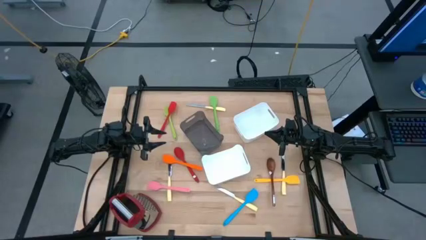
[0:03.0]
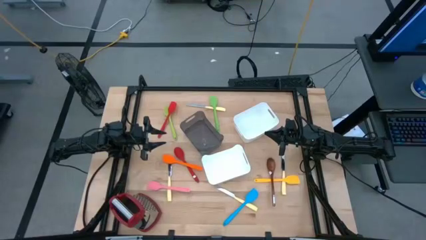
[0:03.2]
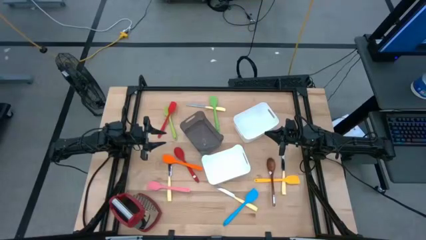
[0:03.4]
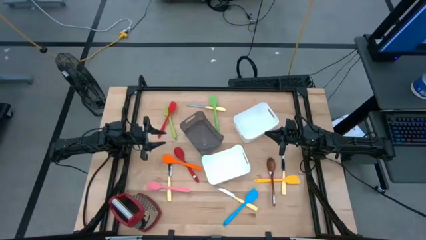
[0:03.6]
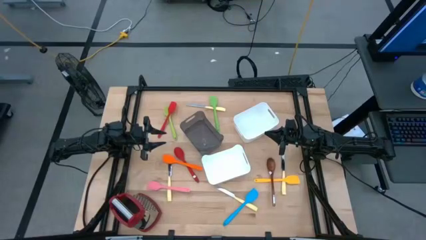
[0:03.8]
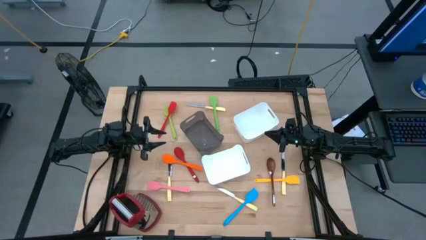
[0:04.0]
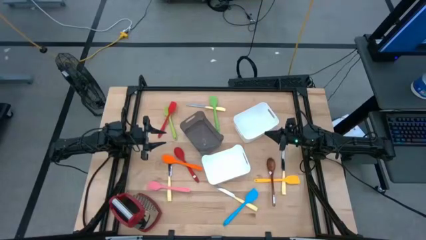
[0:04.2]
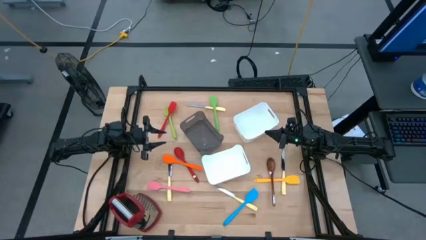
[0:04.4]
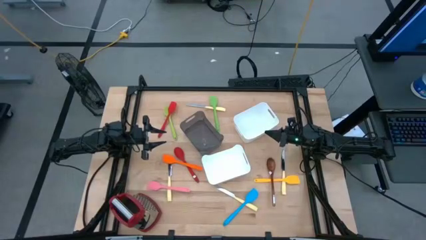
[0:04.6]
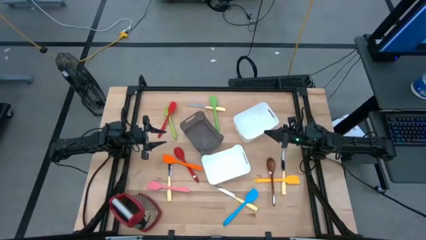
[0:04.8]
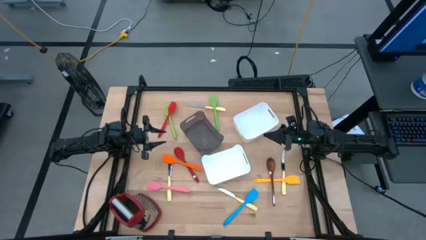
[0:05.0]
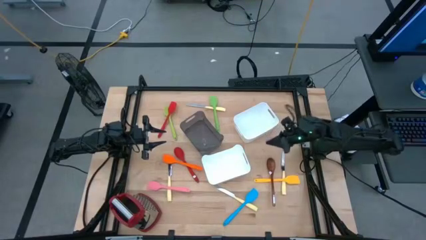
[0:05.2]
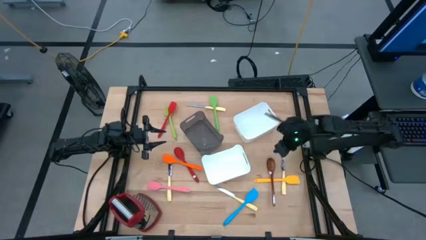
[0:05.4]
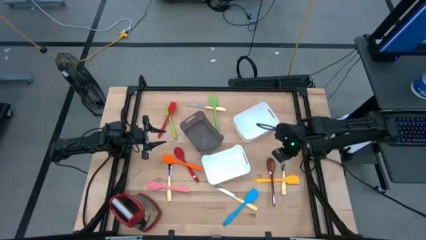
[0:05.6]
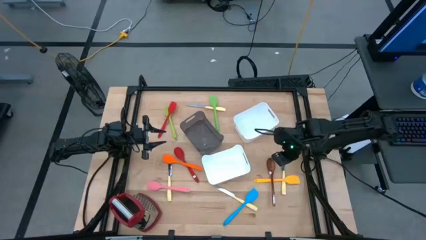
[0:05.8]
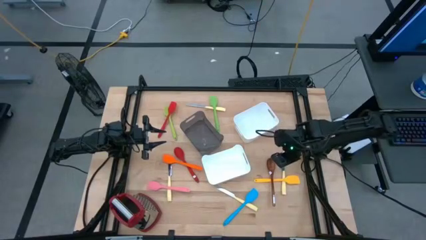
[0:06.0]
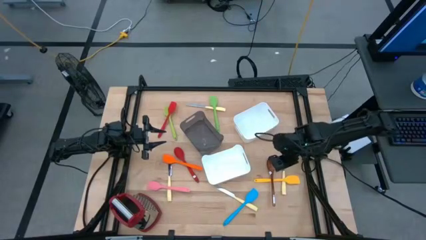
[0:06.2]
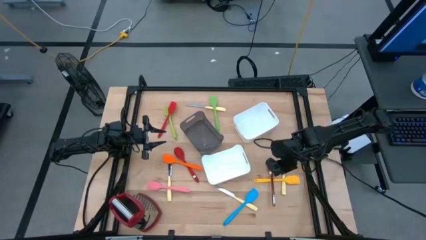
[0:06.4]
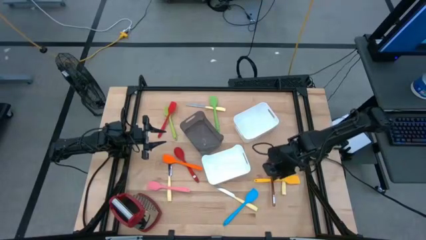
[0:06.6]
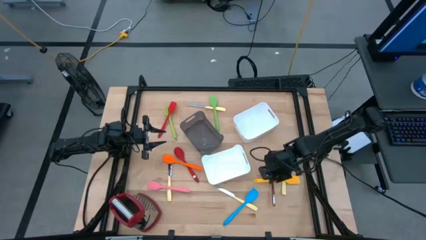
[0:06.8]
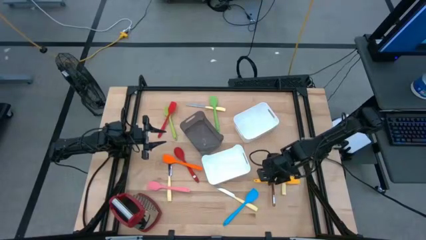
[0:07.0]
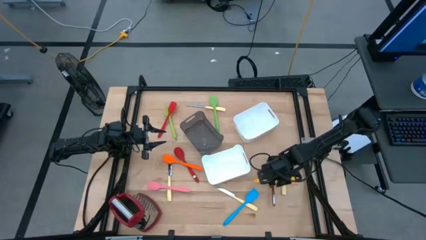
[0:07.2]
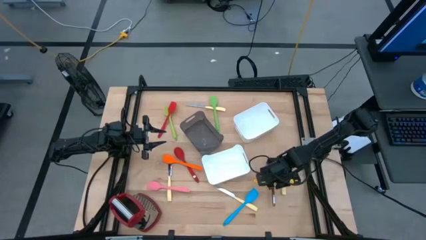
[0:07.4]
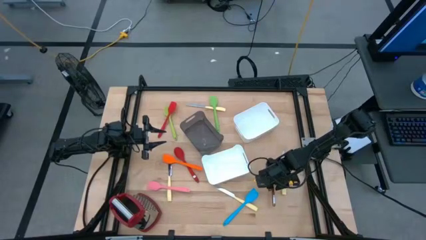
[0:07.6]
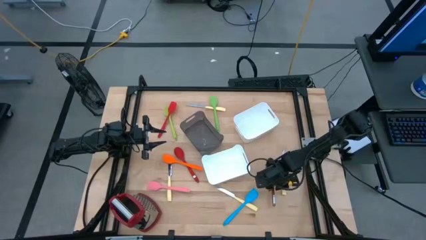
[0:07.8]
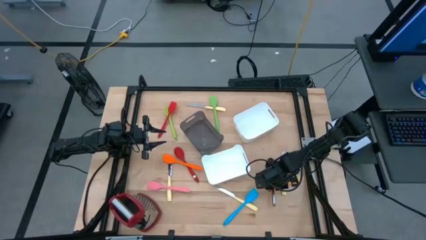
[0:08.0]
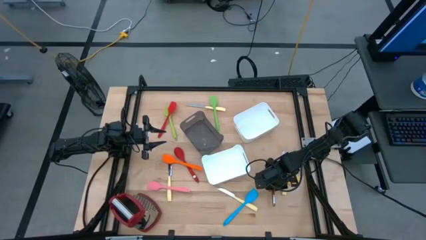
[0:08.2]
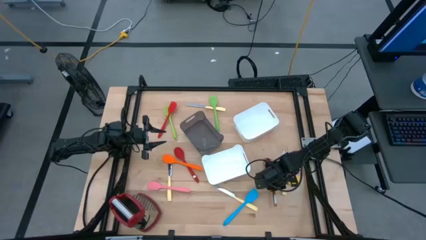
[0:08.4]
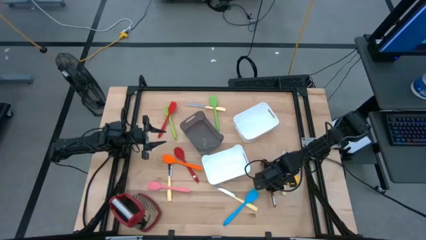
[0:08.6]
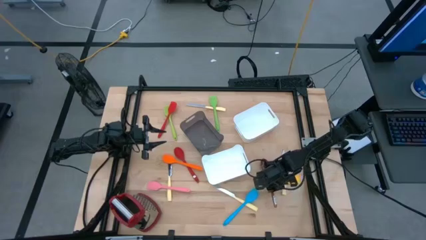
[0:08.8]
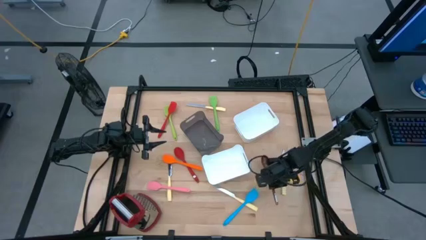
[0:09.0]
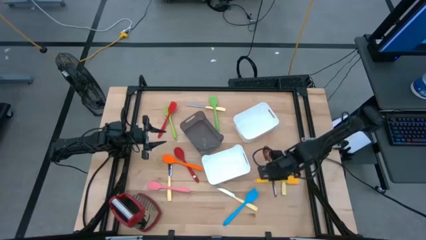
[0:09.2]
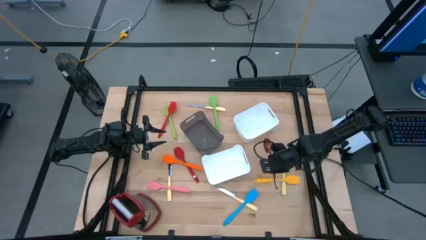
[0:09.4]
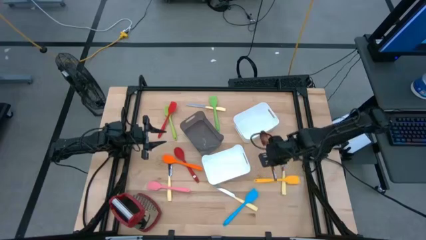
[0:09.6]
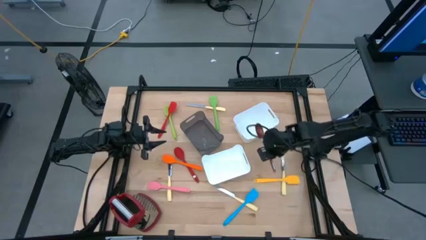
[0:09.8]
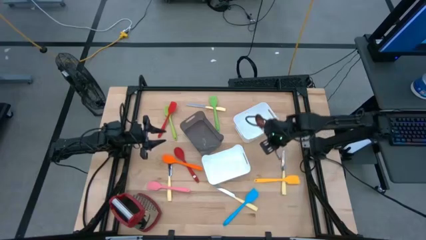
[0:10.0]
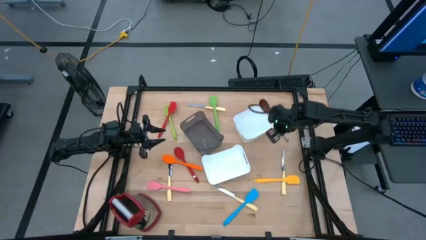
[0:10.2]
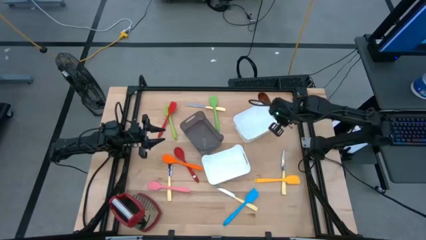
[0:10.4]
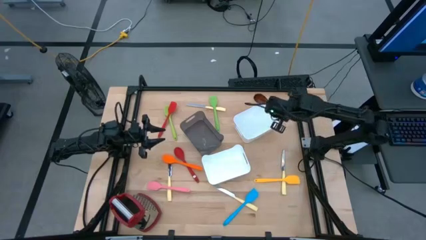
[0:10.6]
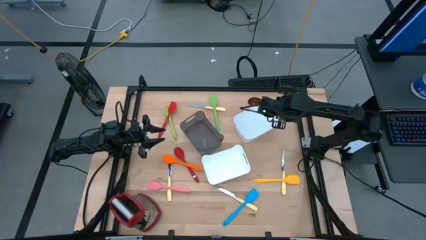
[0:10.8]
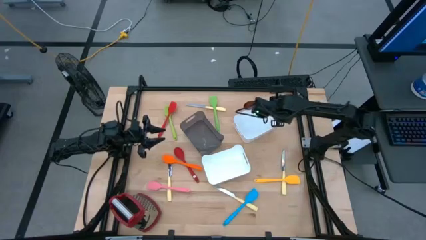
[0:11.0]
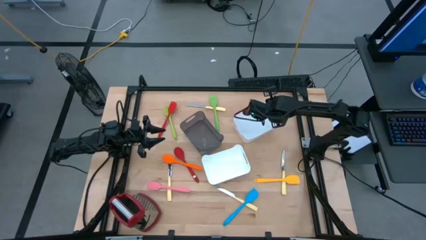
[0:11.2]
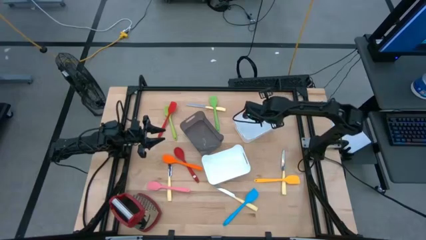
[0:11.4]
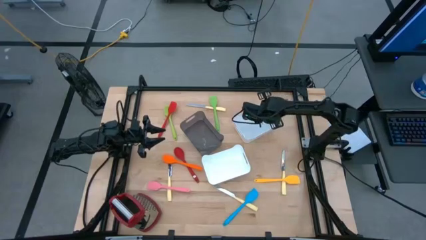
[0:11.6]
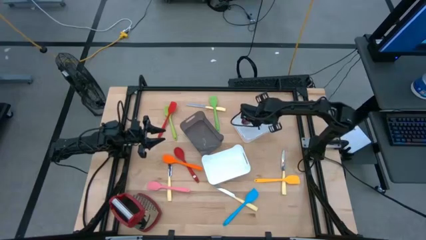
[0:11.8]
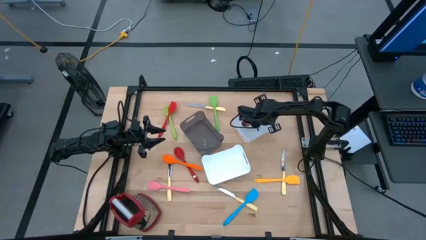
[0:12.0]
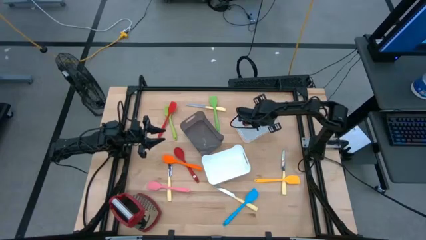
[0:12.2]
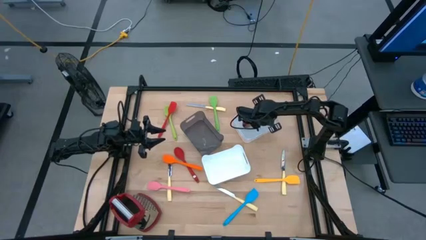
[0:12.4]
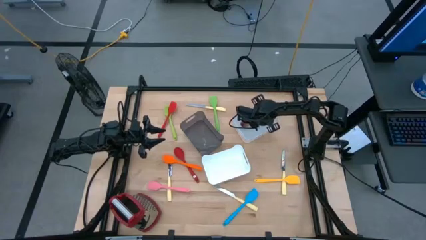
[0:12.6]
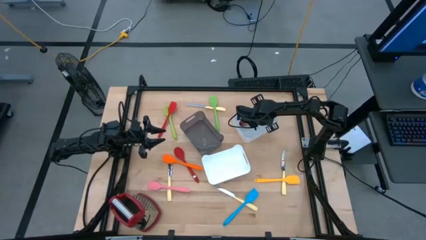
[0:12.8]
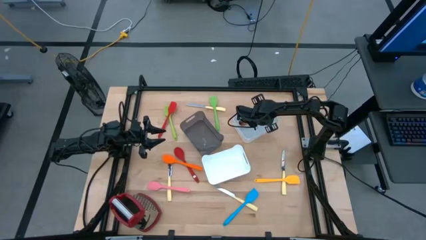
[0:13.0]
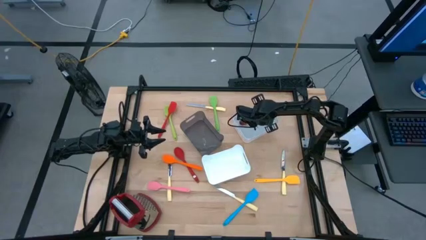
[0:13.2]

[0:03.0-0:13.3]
Task: Pick & Place Kitchen Items
Put the brown spoon into the top white bin
